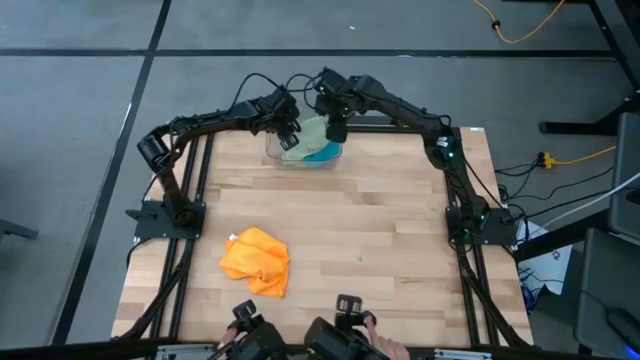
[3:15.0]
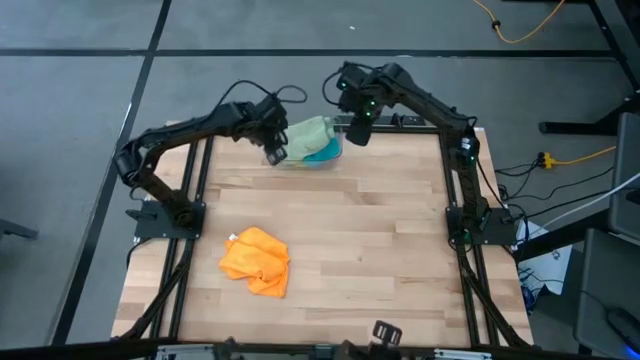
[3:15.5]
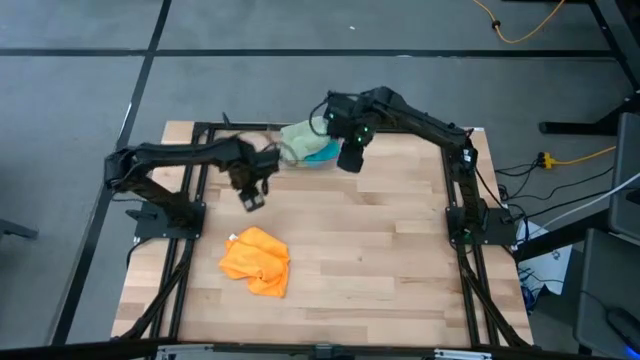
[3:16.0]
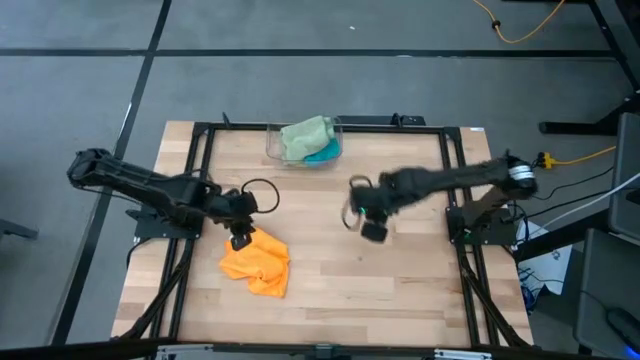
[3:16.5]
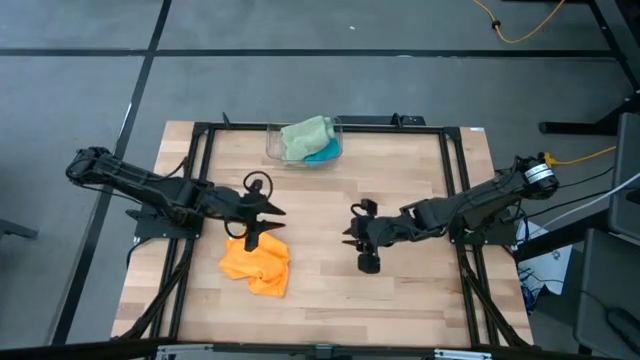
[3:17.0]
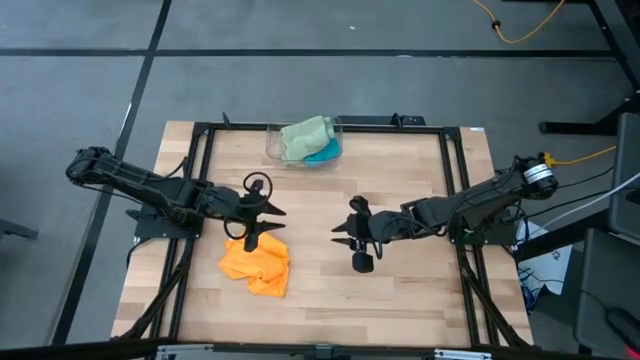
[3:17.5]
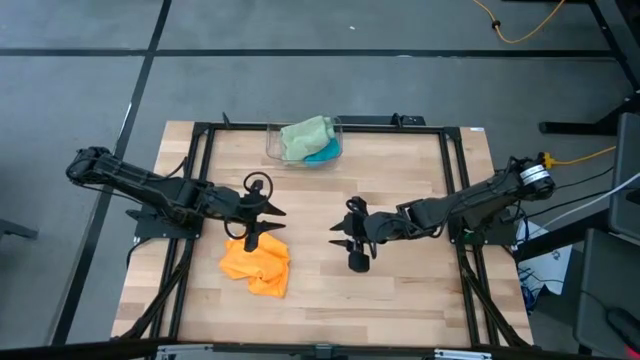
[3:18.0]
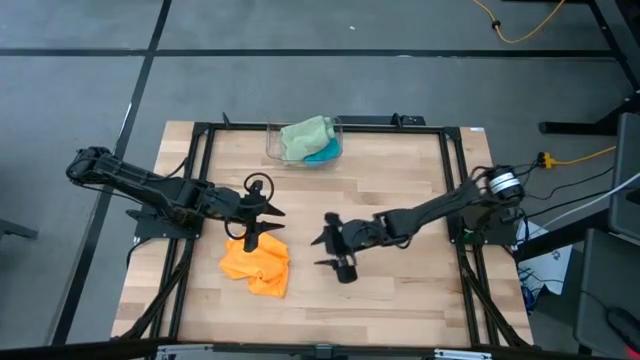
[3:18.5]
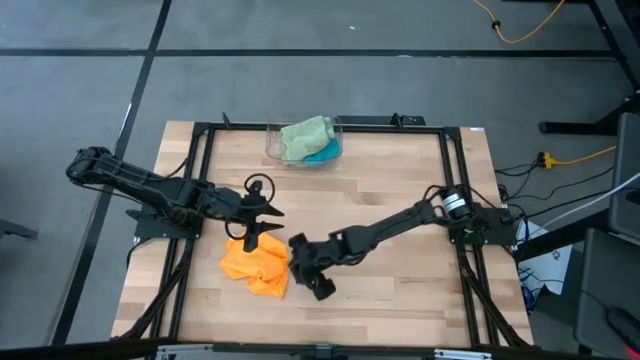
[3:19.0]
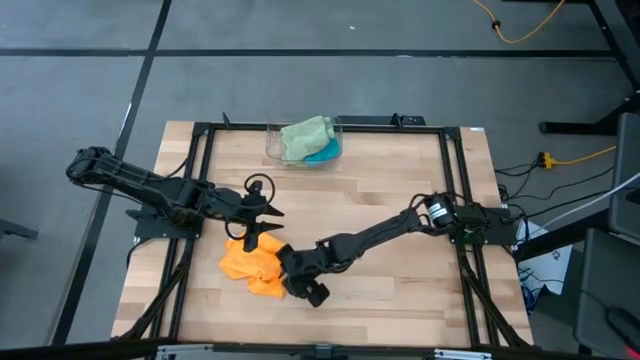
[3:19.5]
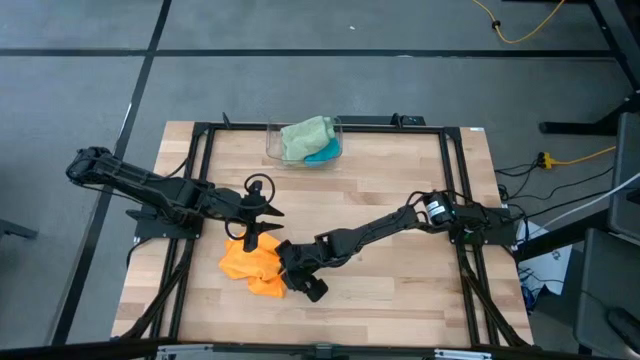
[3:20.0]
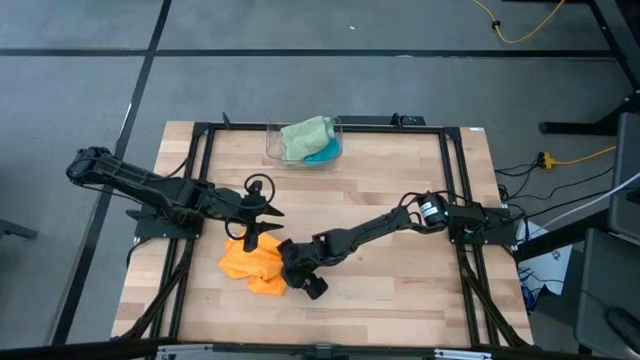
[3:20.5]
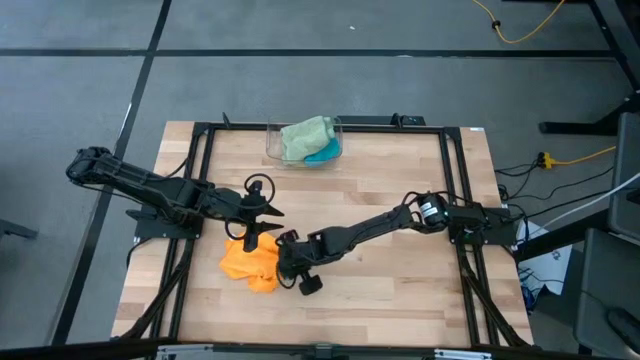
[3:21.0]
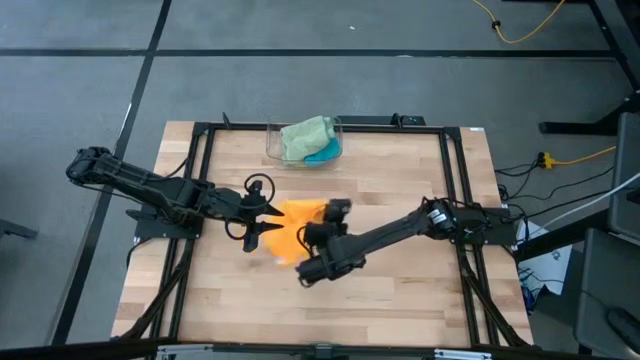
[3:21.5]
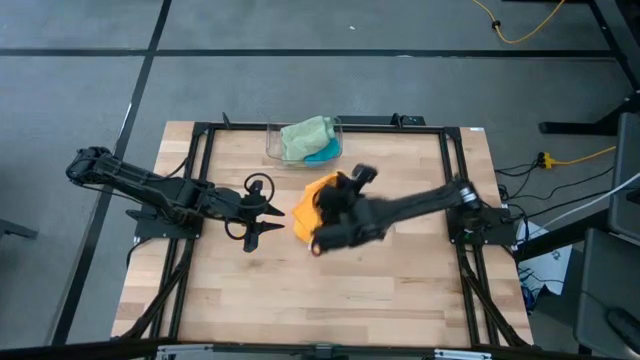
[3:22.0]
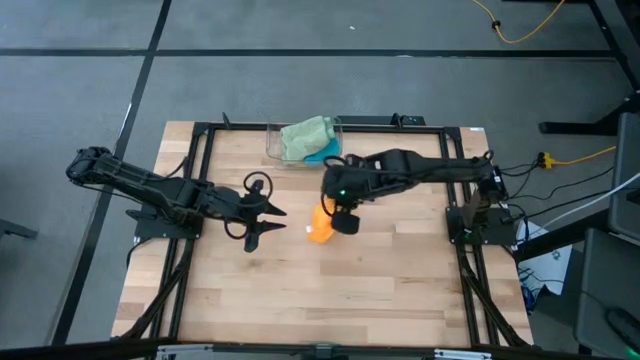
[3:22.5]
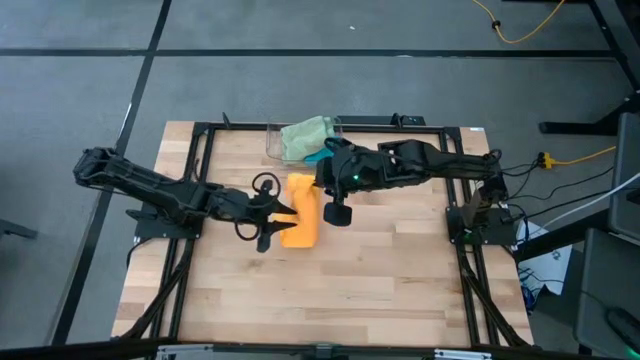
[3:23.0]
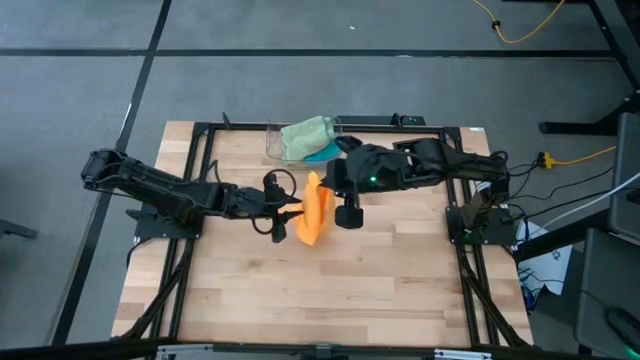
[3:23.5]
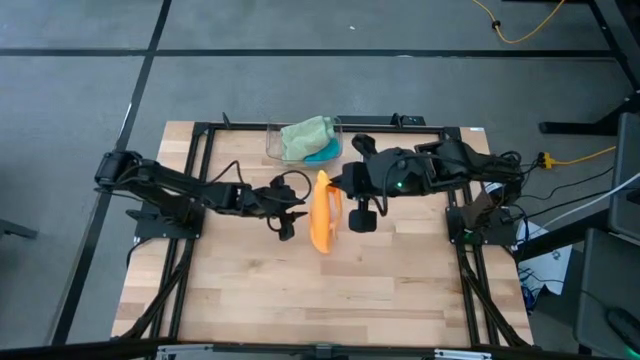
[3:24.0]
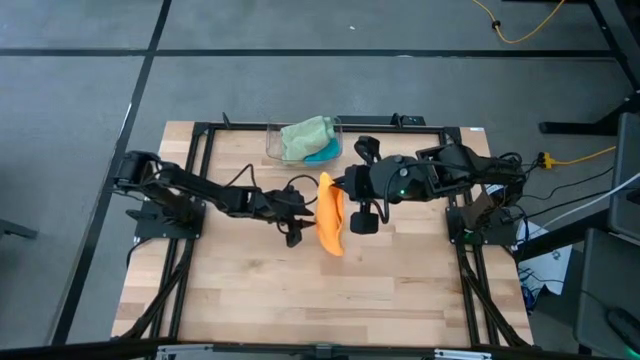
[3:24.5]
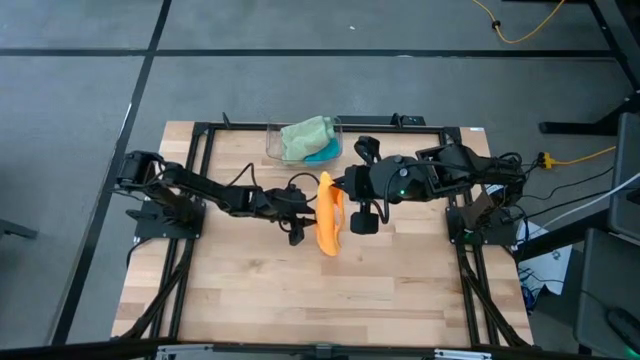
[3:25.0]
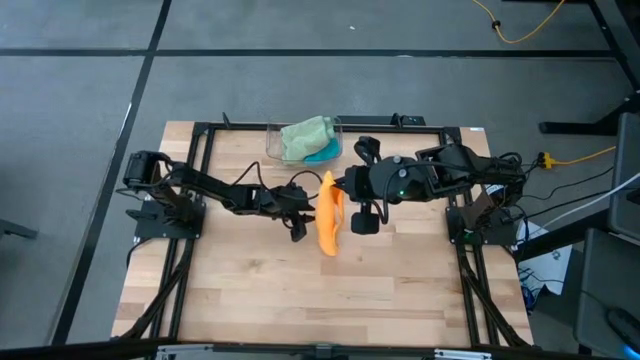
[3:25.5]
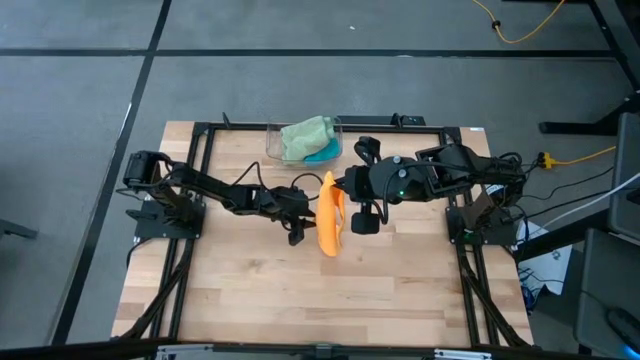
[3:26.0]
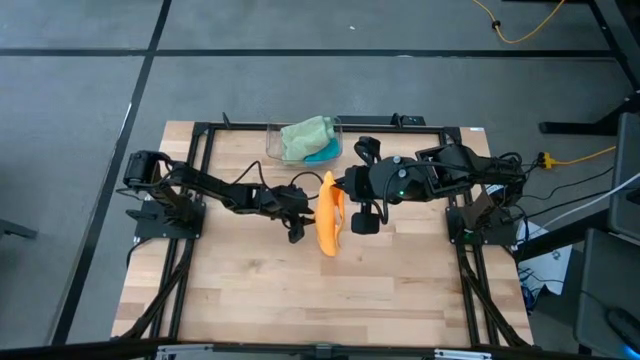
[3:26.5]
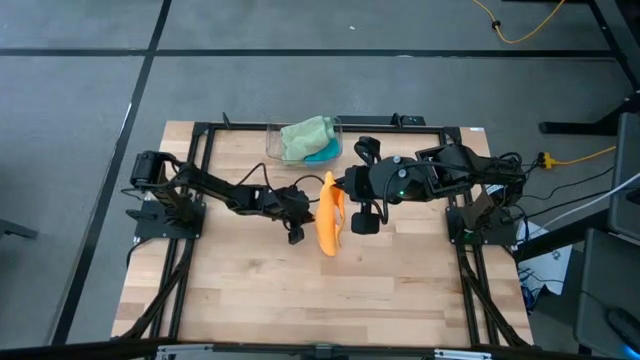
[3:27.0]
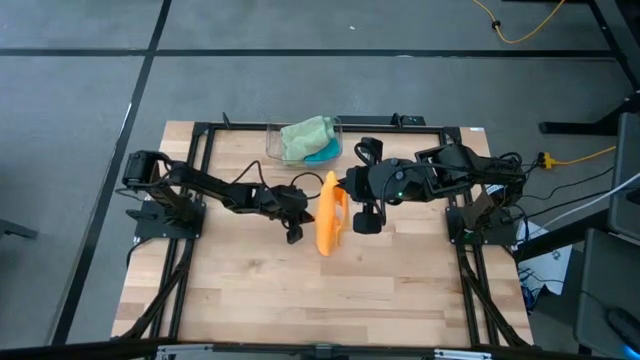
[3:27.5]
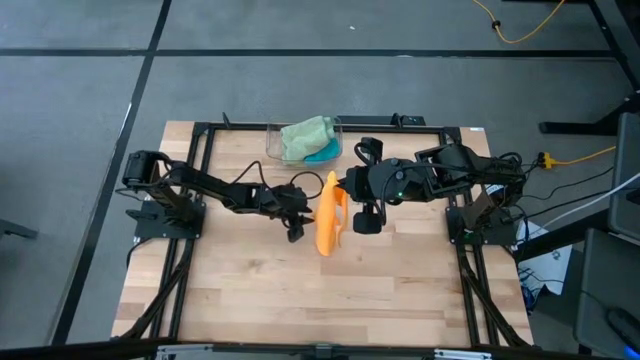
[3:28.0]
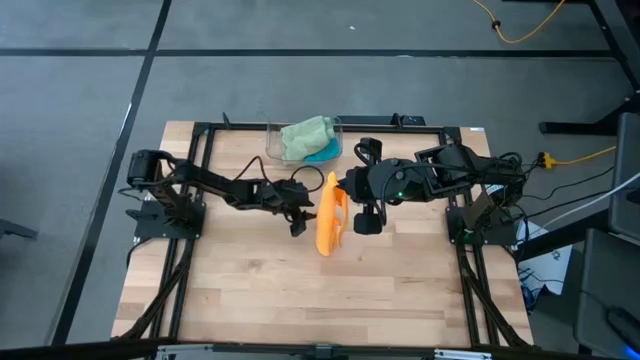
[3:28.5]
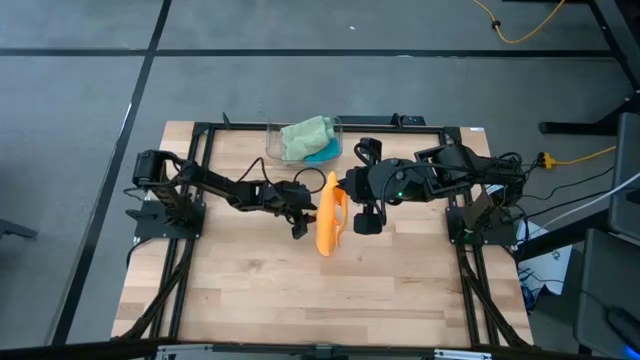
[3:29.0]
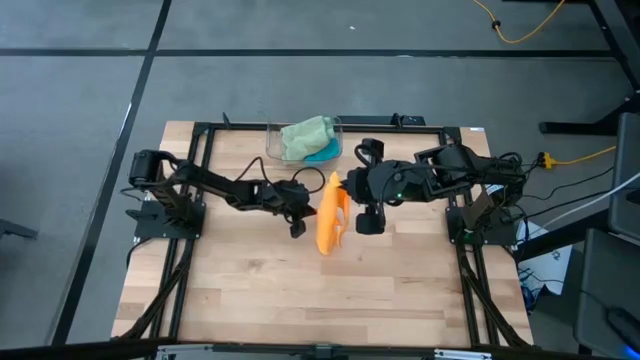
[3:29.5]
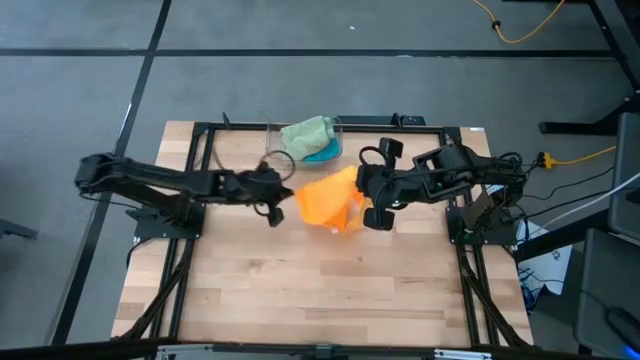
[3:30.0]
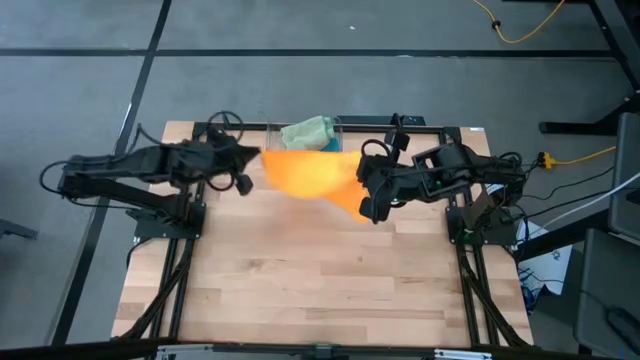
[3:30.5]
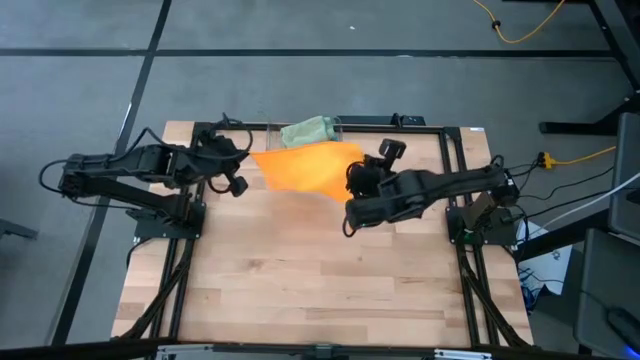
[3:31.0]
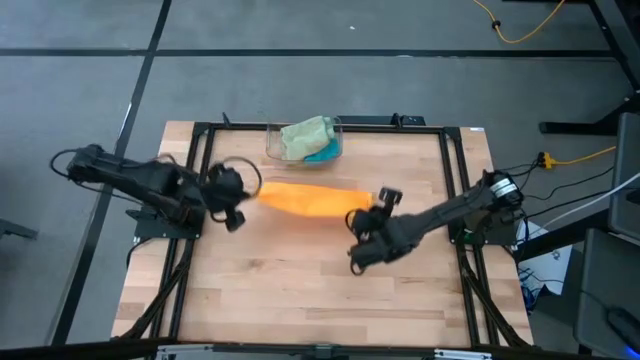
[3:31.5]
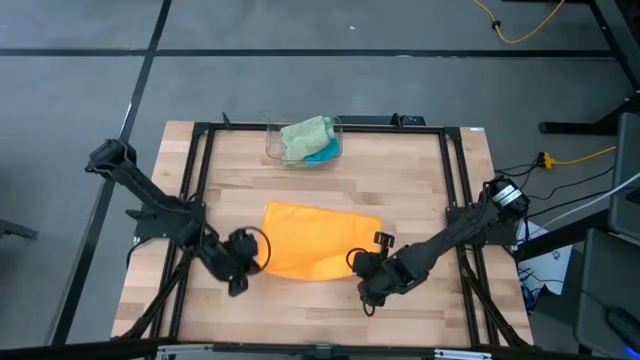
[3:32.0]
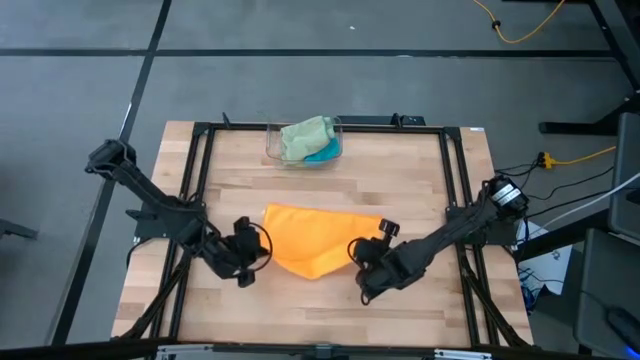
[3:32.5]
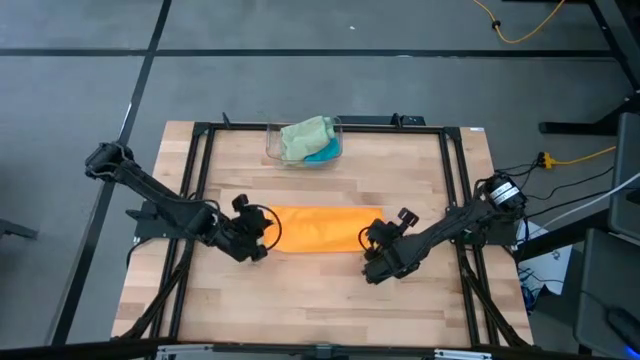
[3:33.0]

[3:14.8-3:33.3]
Task: Fold microfiber towels
Fold the orange towel

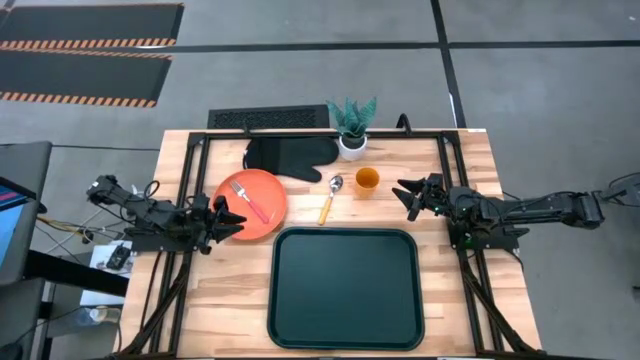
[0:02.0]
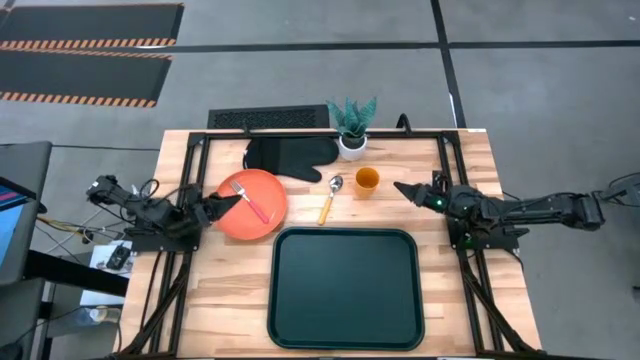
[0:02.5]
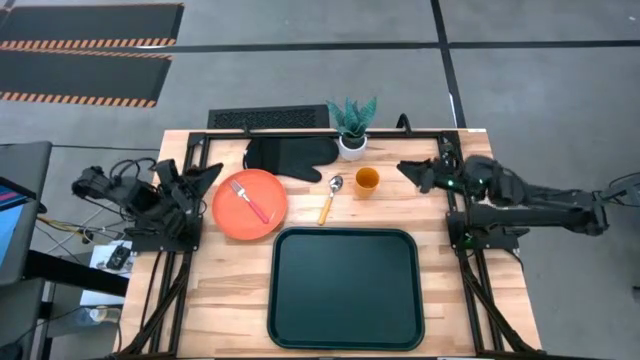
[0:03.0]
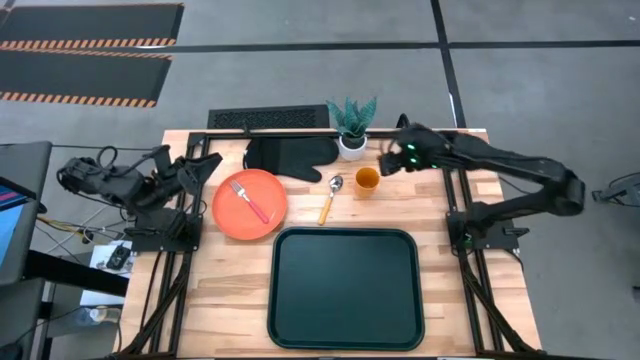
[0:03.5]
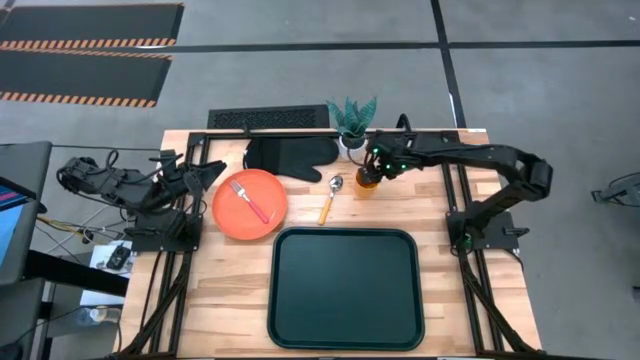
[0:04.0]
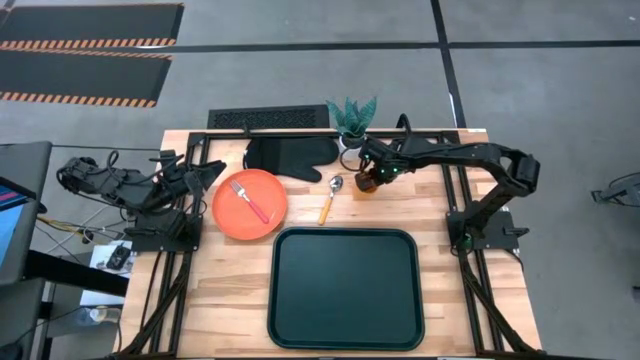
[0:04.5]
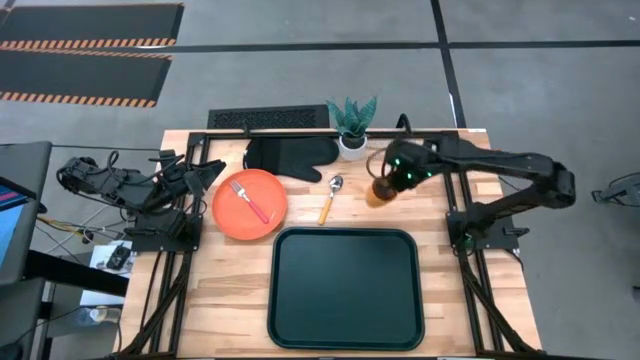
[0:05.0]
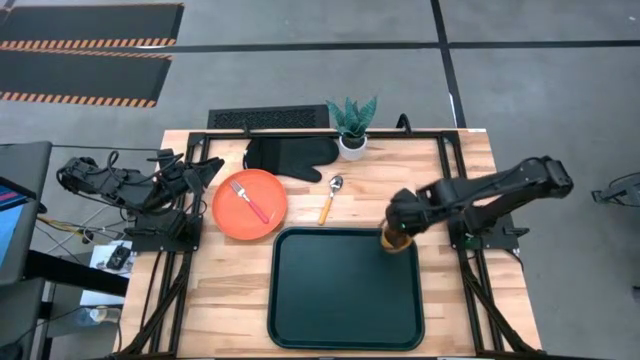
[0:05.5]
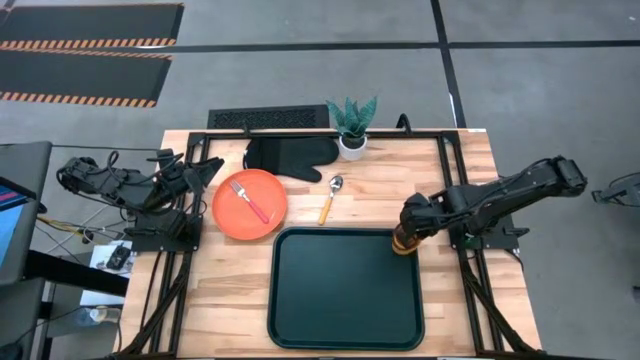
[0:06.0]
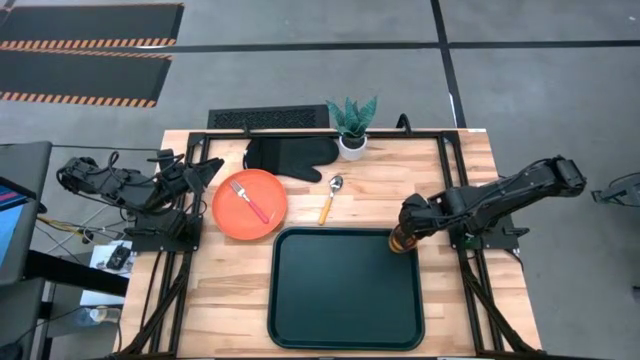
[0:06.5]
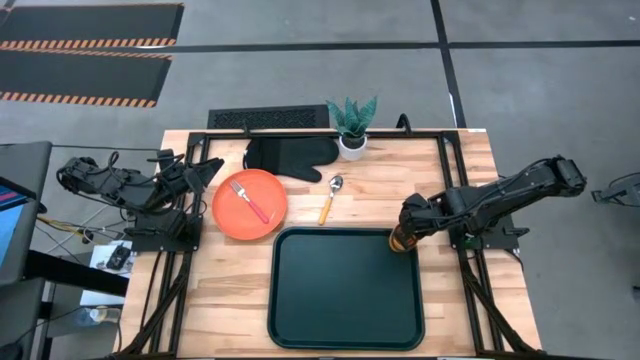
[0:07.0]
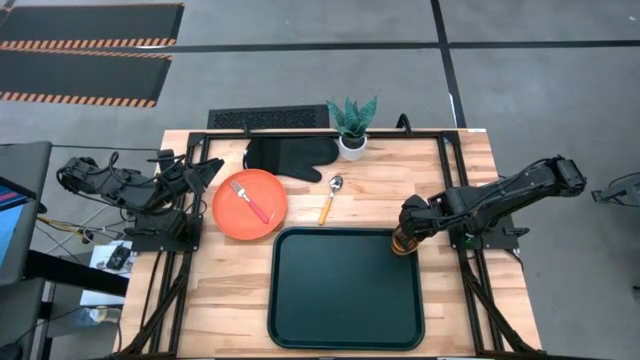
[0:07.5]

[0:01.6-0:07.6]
Task: Pick and place plate/cup/fork/spoon on tray
Put the yellow cup on the black tray
